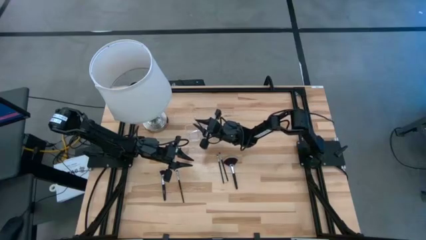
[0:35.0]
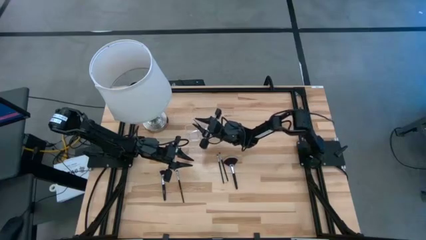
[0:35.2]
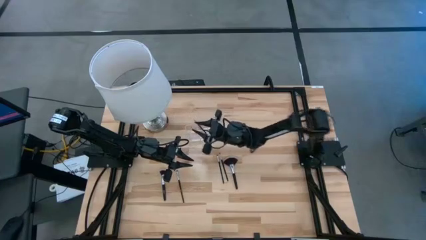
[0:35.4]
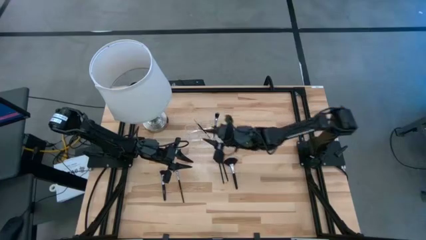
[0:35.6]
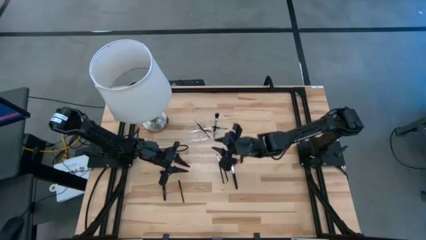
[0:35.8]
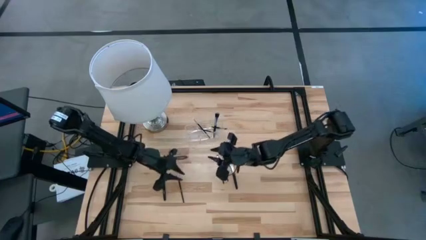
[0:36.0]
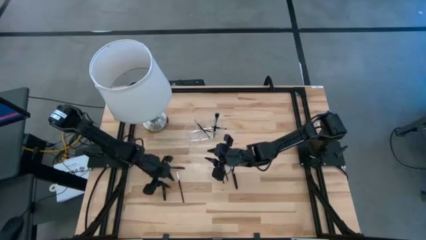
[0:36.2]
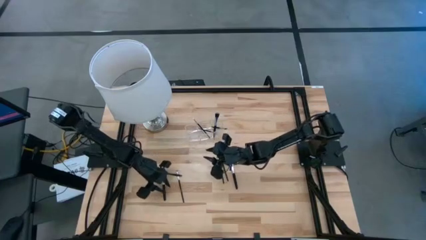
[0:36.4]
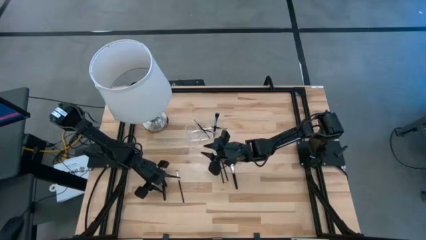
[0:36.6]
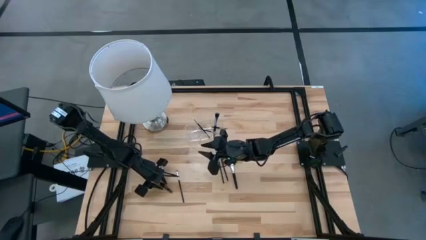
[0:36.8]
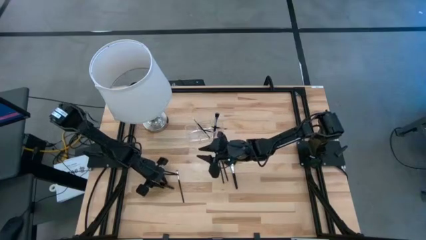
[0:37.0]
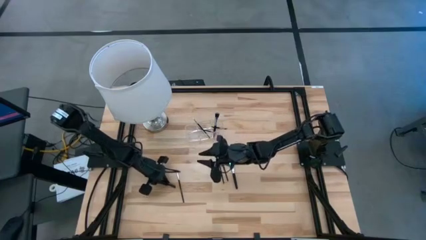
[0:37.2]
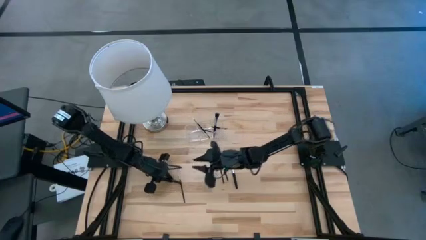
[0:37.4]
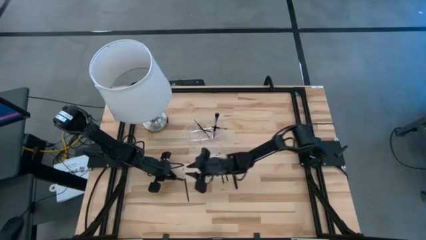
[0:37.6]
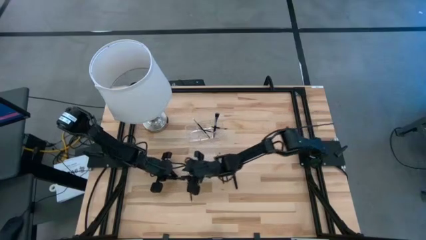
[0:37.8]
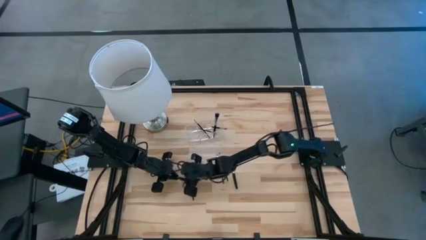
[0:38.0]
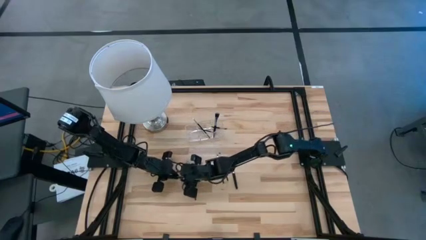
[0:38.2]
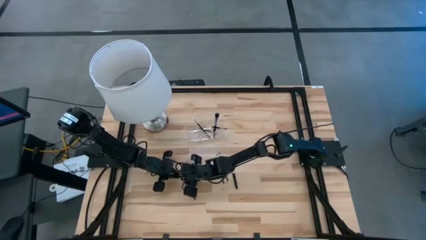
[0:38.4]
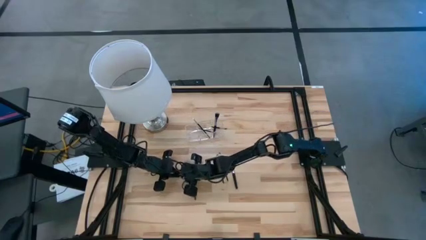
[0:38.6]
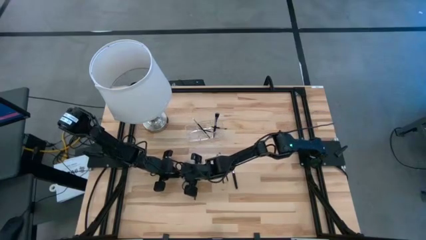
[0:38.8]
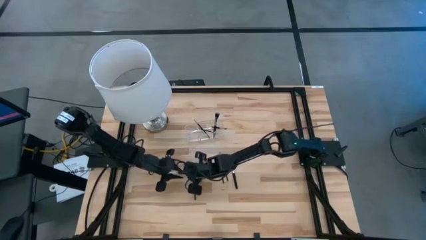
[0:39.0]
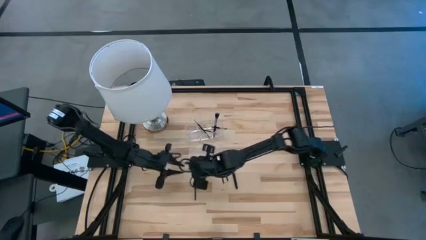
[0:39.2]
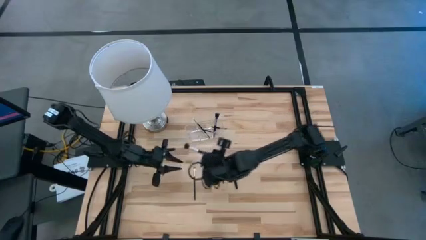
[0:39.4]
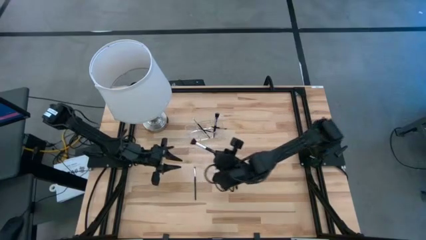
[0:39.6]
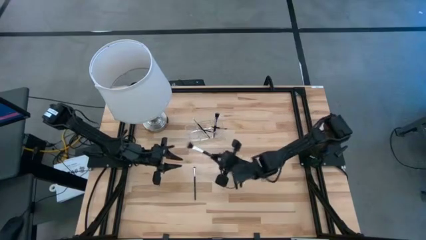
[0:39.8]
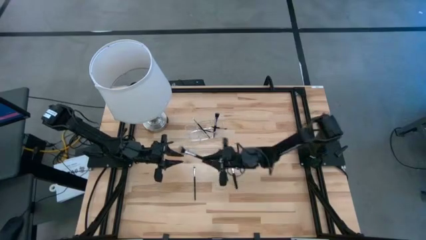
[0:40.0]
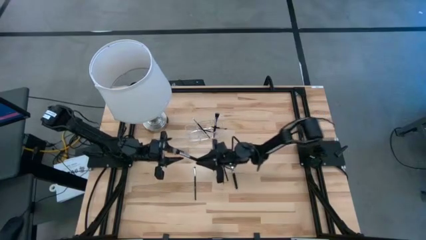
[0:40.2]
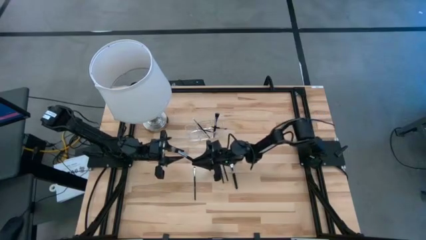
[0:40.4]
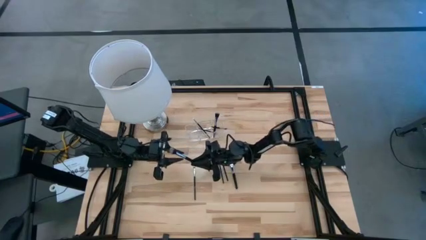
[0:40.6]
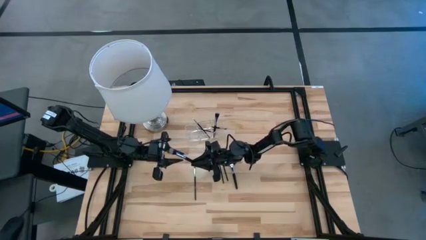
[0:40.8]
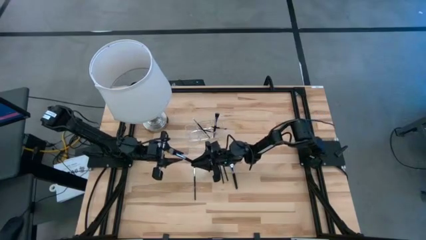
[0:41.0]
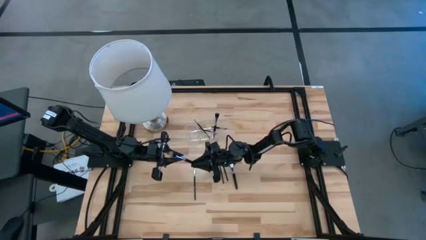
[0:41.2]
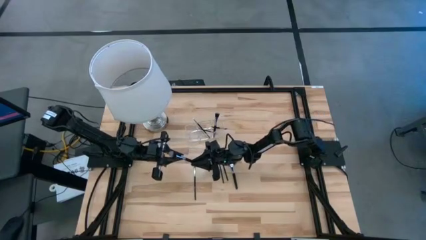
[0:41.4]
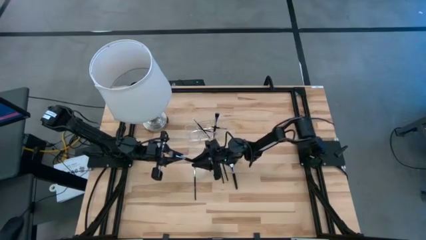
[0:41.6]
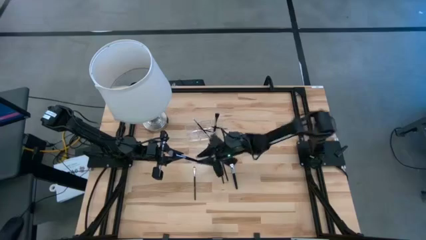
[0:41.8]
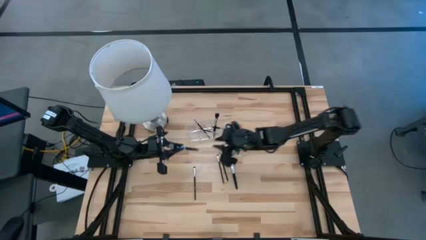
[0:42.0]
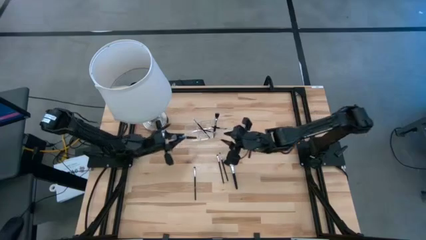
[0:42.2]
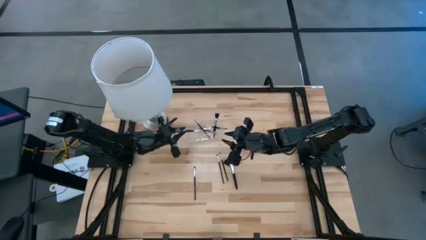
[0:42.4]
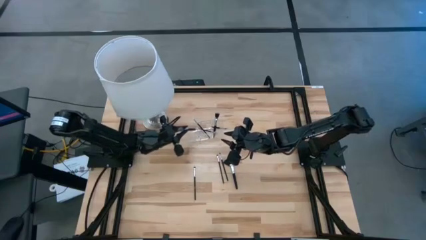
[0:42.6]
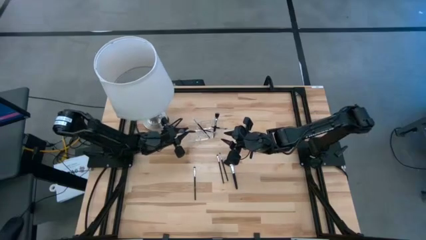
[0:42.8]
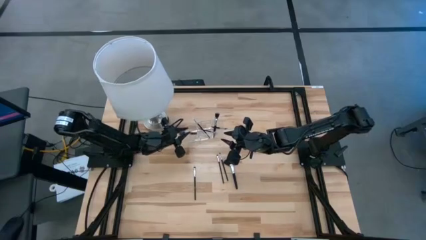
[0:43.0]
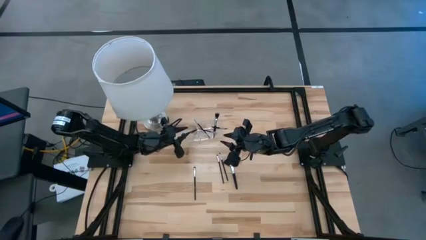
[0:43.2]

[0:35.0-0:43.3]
Task: Put items in baskets/containers
Put the black powder brush into the transparent organizer

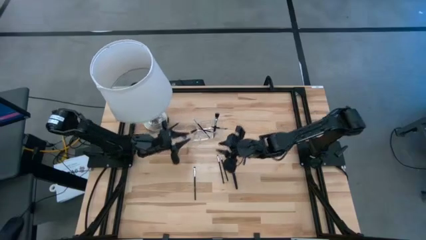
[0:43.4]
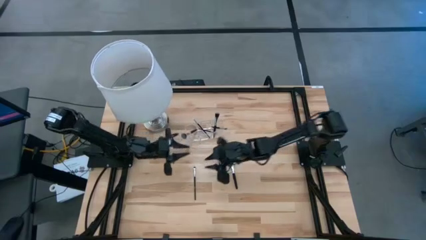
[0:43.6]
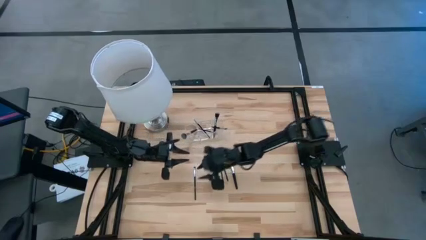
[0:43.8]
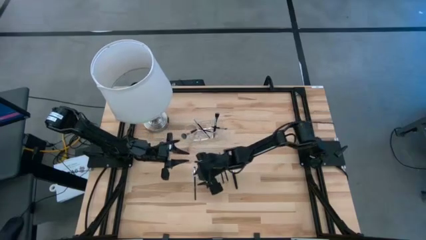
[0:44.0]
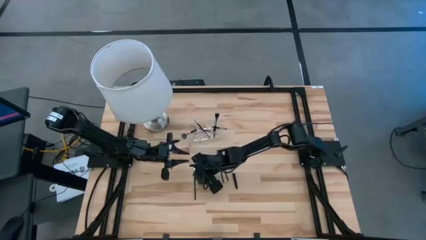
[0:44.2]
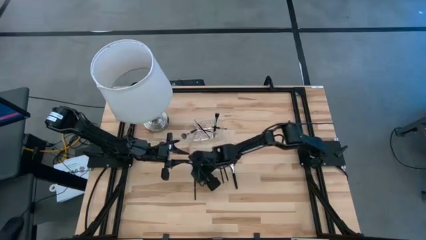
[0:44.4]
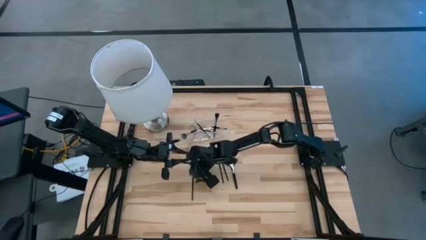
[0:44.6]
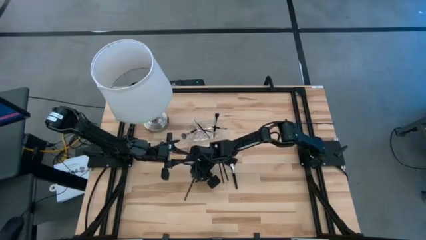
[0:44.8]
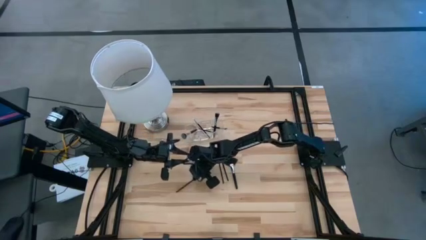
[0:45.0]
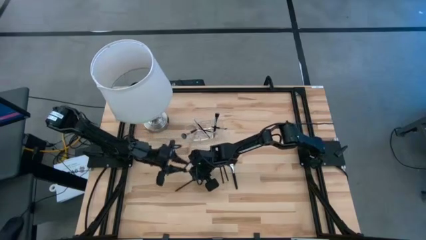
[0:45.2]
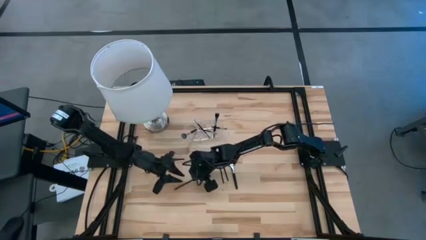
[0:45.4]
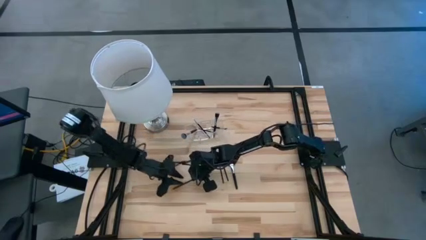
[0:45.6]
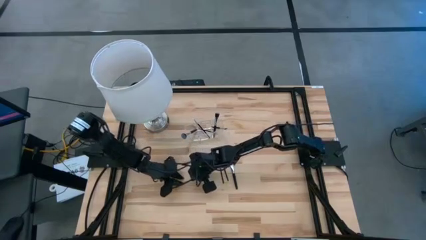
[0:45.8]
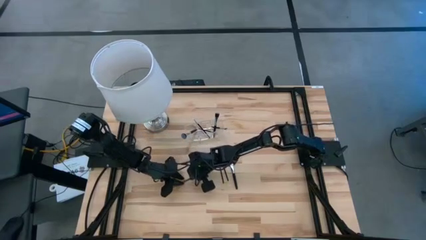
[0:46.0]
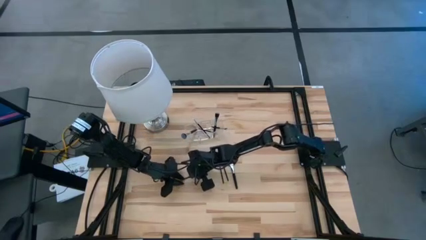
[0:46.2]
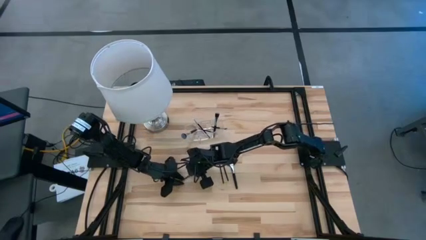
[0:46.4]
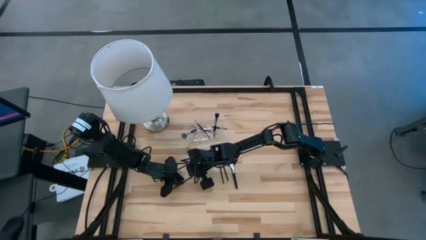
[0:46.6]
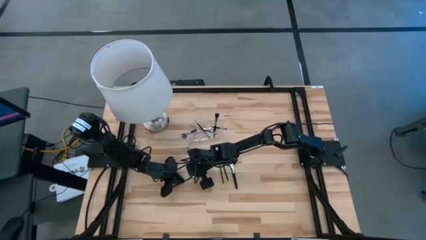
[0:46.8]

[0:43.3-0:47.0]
Put the black foundation brush into the transparent organizer

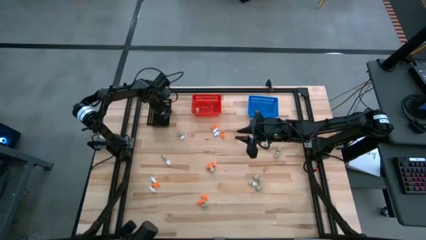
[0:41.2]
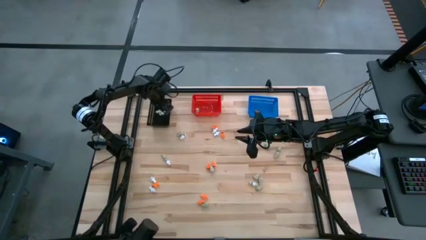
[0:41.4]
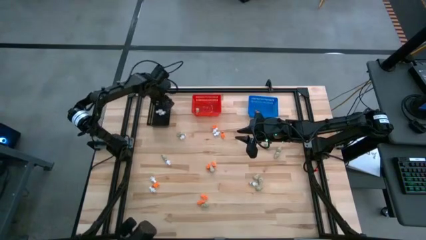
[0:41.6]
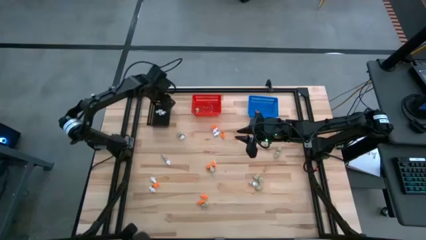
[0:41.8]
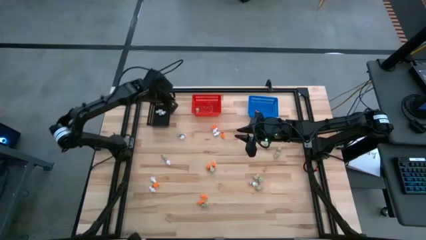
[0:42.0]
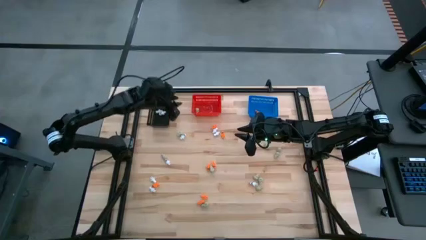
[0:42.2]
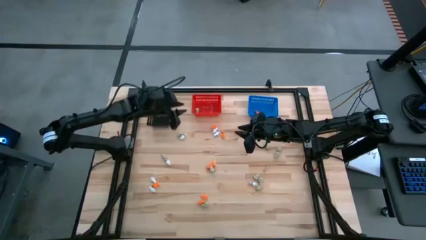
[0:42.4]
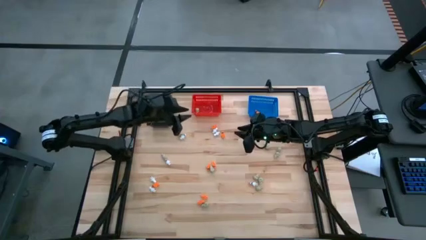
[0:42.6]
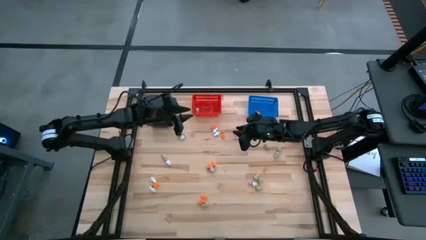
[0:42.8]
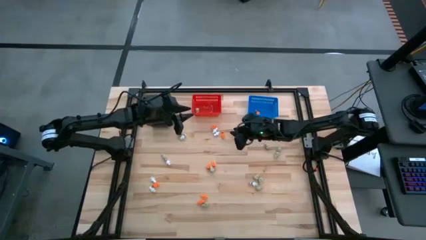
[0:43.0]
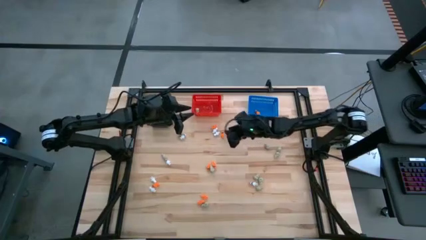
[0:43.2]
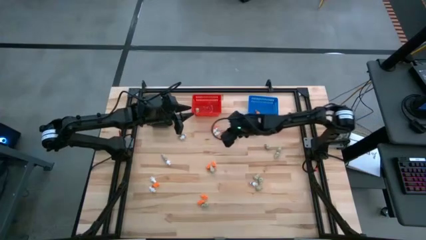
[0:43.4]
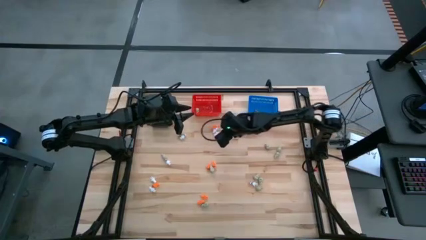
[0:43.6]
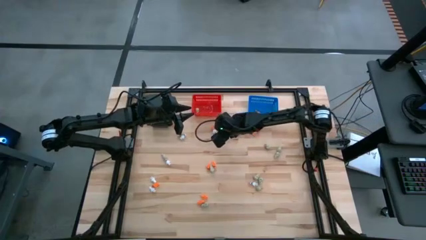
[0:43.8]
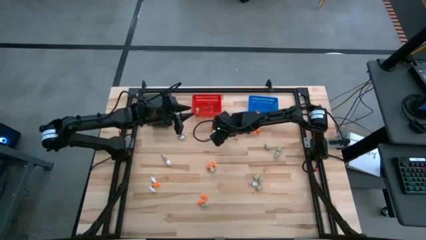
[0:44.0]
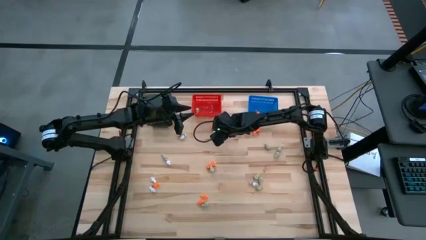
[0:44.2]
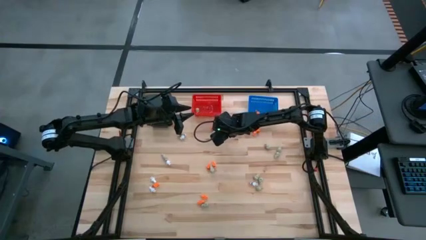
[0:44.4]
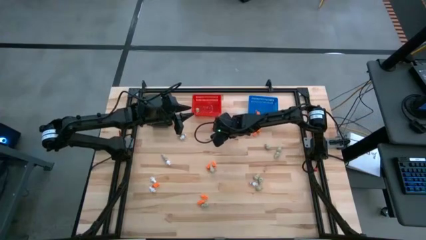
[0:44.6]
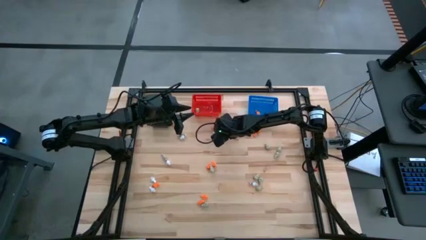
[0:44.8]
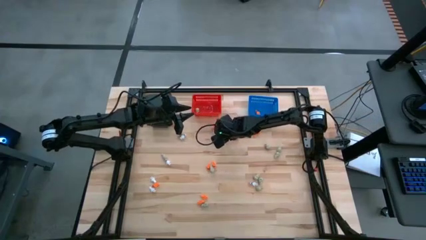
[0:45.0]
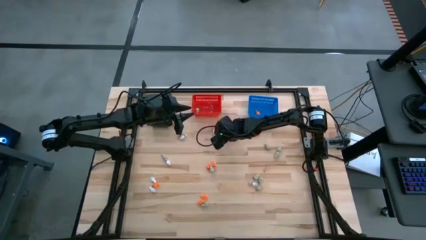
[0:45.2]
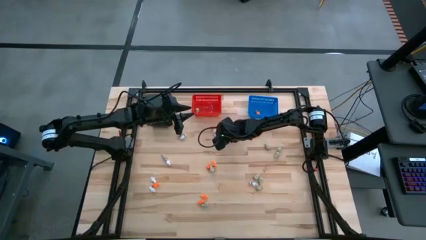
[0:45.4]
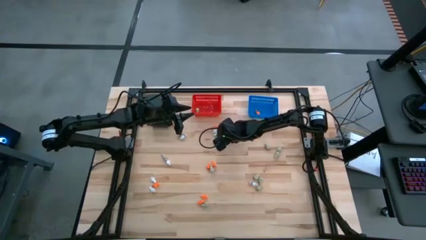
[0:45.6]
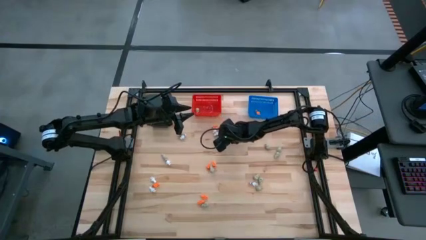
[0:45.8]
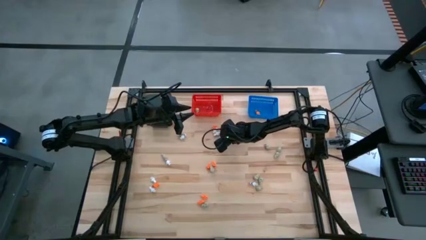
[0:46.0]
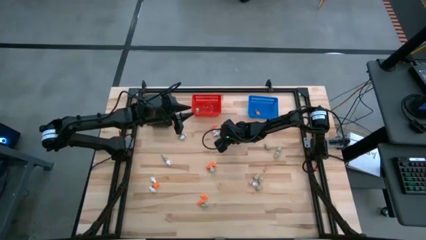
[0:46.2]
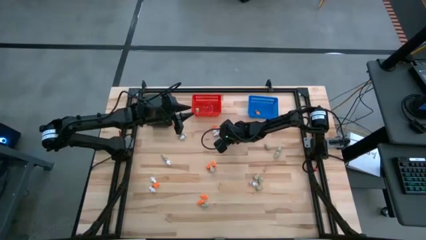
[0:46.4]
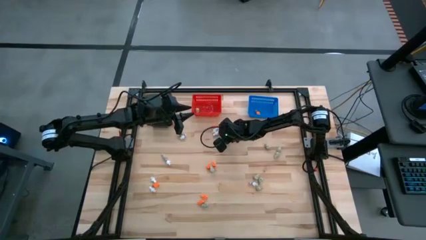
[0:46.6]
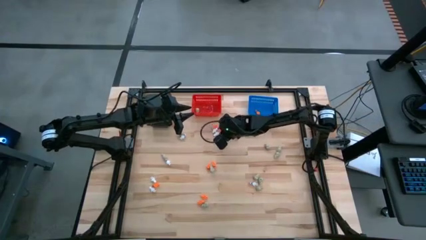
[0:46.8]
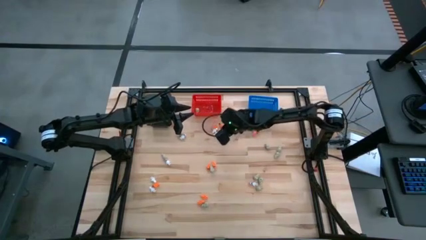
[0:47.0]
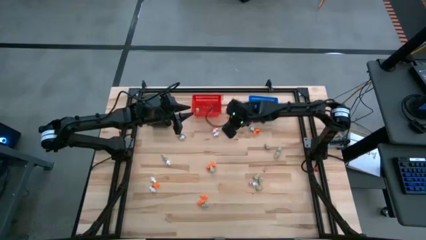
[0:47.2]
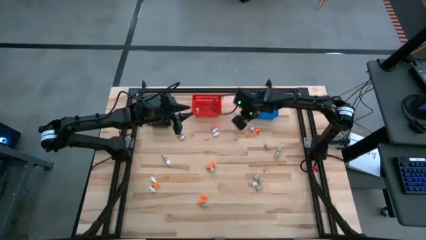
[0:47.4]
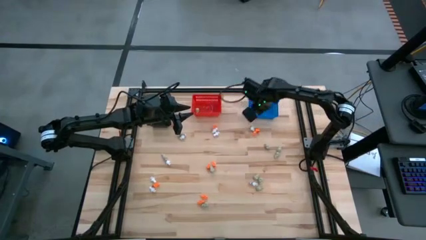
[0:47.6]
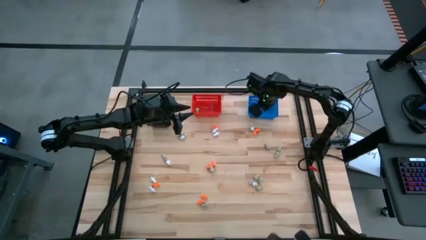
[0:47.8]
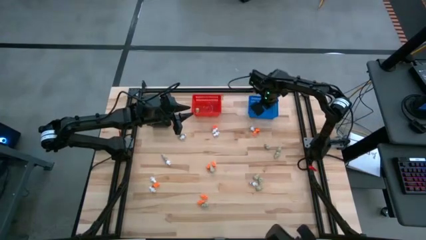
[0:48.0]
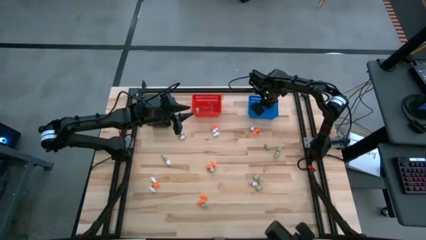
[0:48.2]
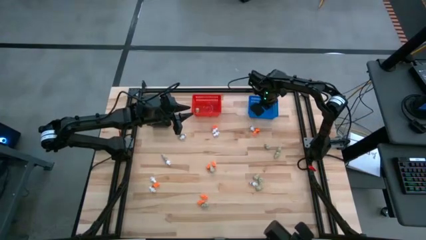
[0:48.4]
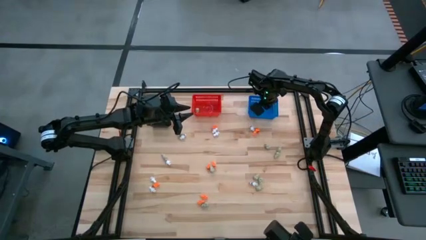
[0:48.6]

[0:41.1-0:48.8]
Task: Sort Halloween decoration
Put the orange skeleton toy into the blue bin
